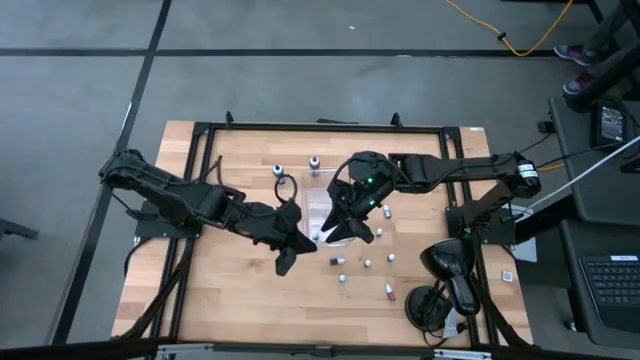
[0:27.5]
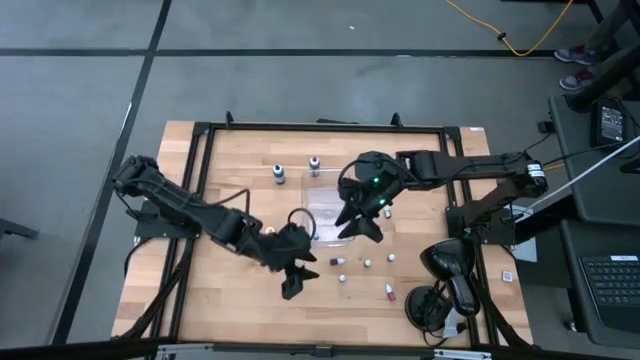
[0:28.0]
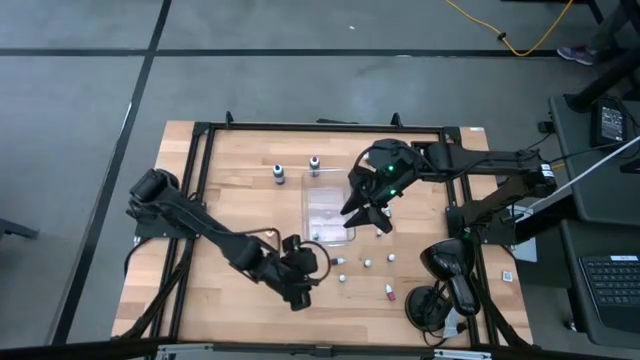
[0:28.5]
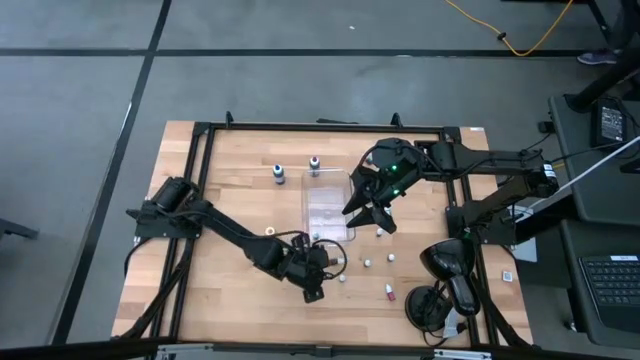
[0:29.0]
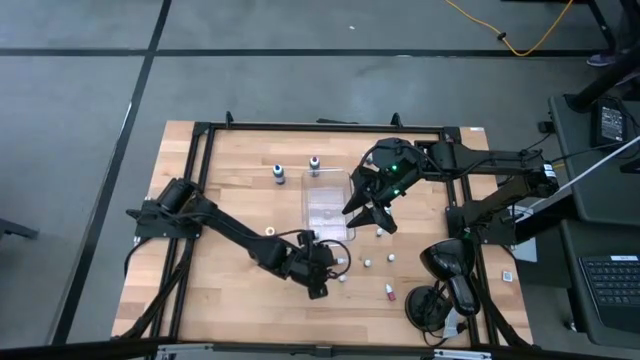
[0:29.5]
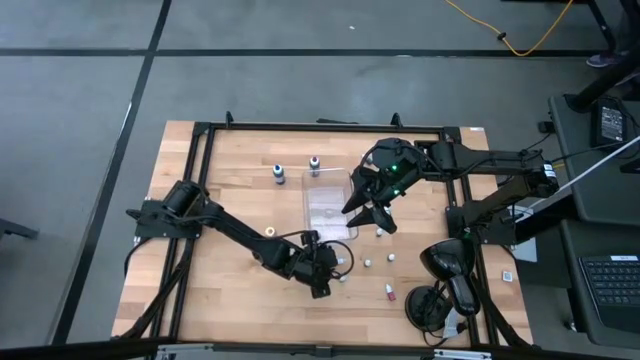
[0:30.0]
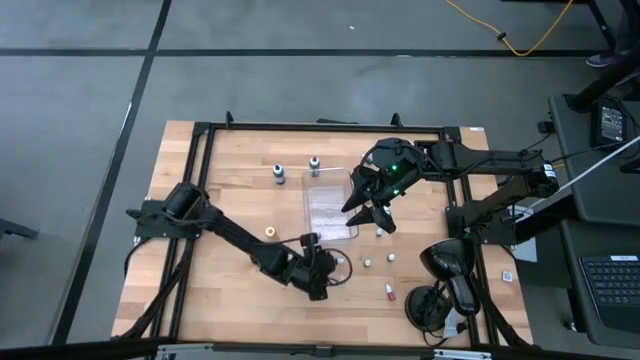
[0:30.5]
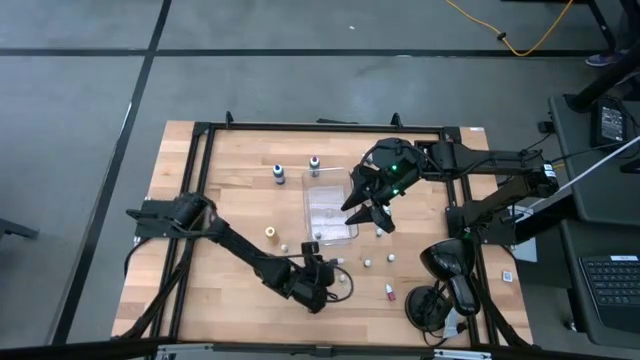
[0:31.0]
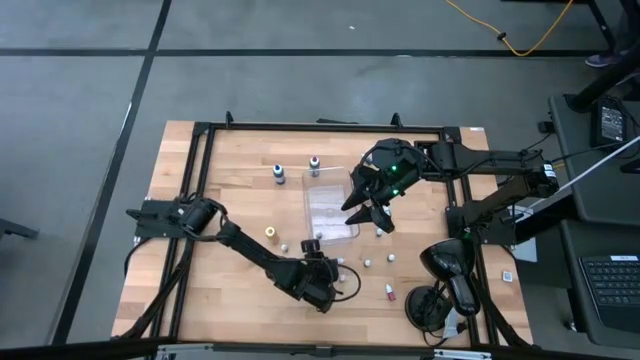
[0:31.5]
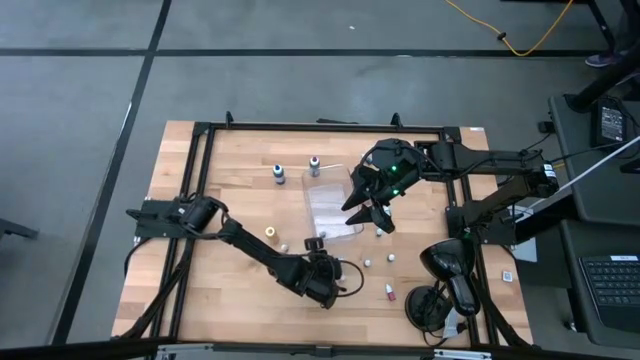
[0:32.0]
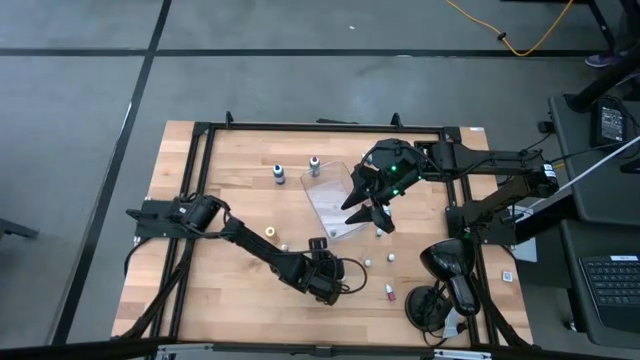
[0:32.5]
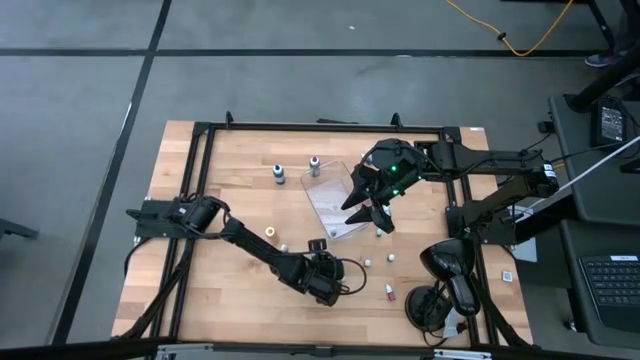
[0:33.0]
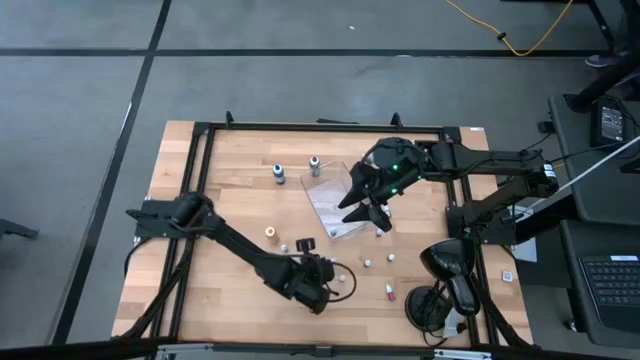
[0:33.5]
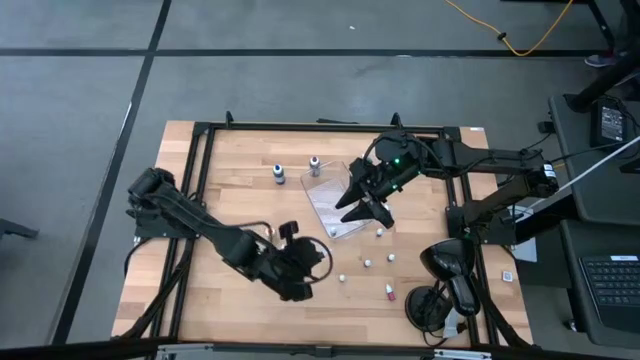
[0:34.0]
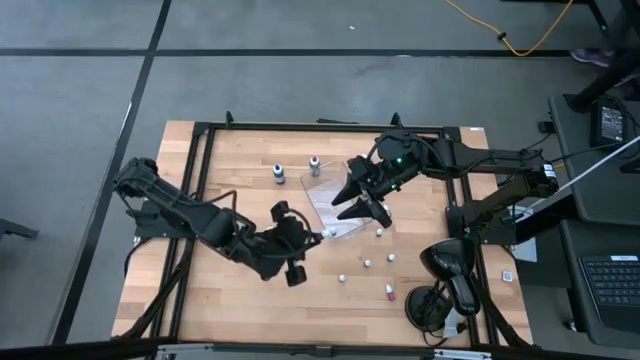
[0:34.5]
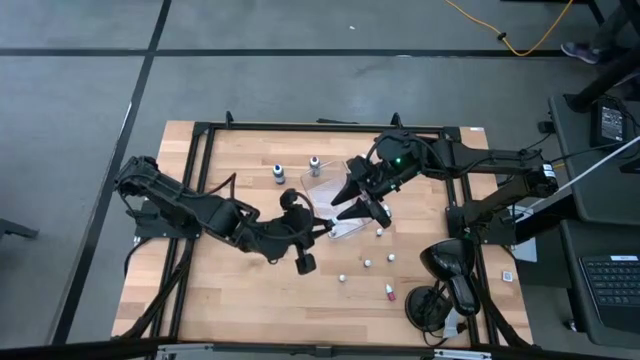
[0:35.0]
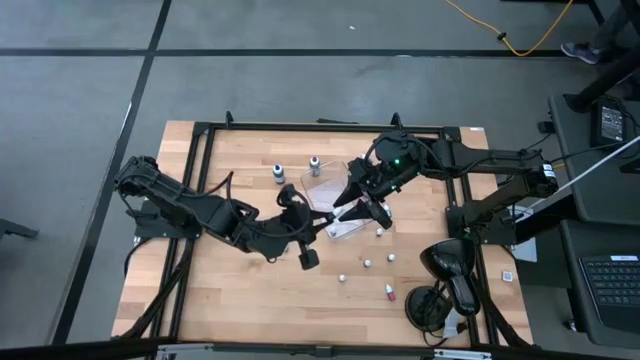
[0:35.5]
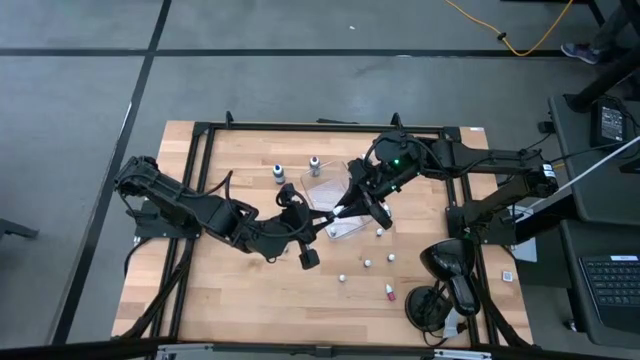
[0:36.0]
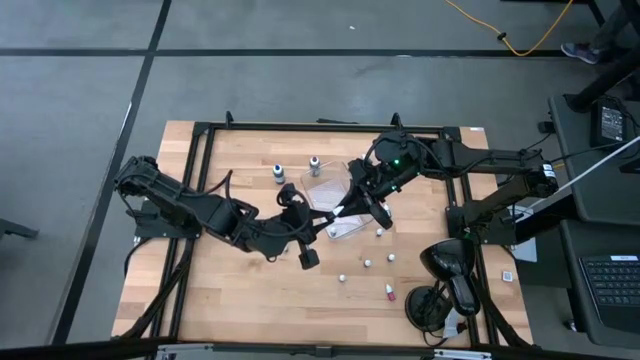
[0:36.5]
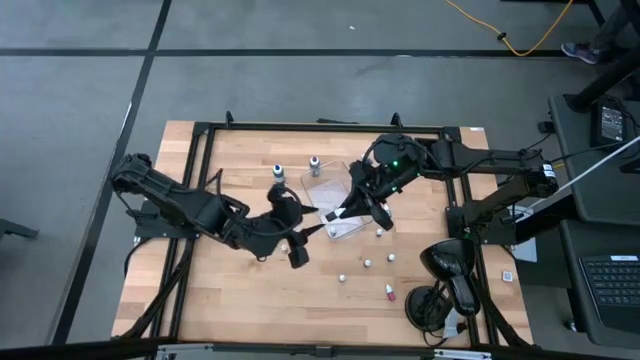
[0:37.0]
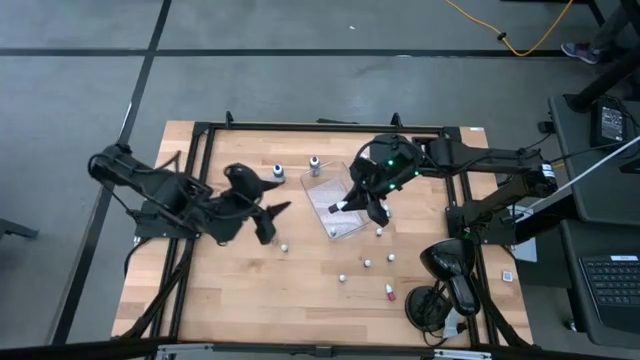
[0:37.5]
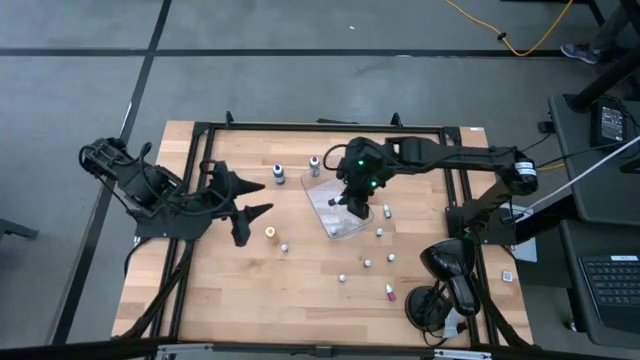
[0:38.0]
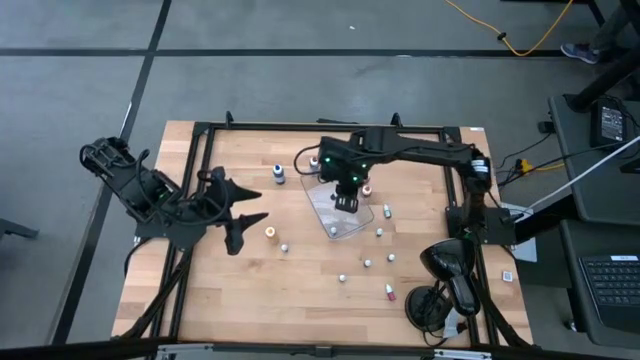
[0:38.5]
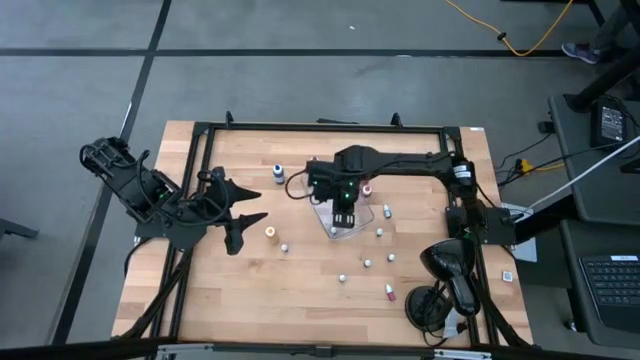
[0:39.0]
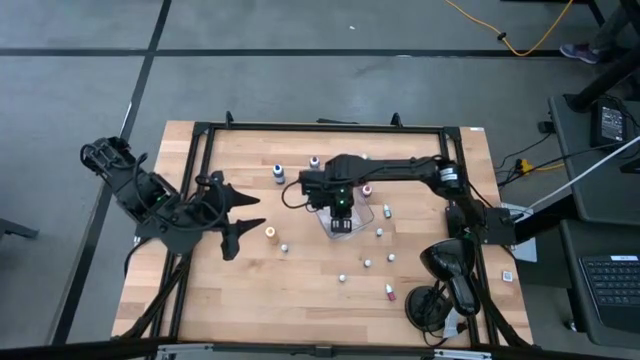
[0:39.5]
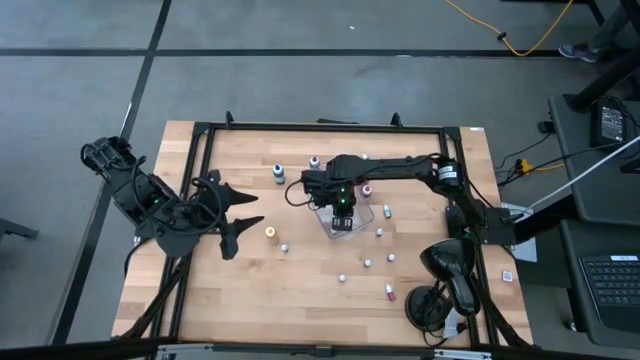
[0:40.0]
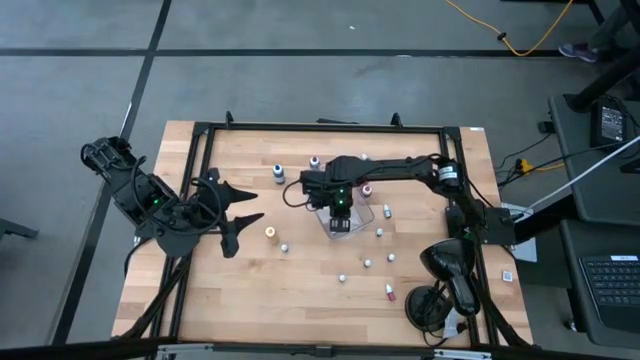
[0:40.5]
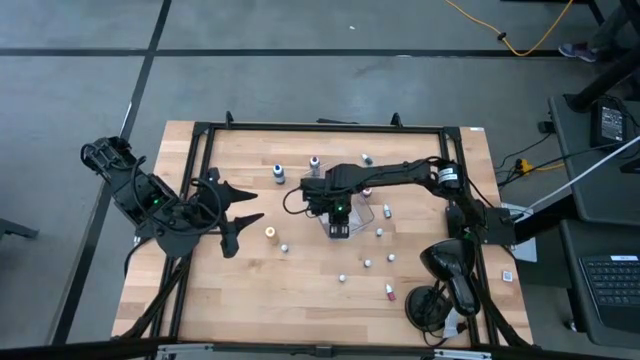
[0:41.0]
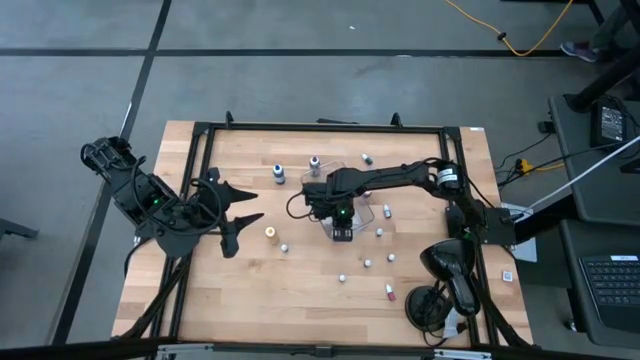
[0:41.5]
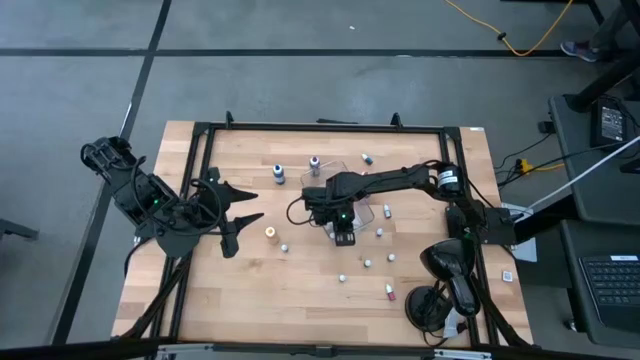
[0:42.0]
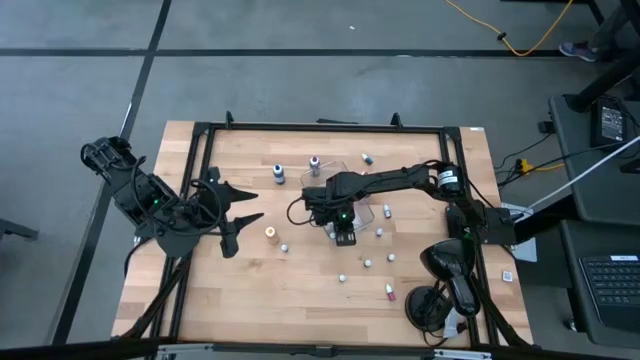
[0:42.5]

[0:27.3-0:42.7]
Task: Pick & Place food coloring
Put the small pink food coloring bottle into the bottom of the bin

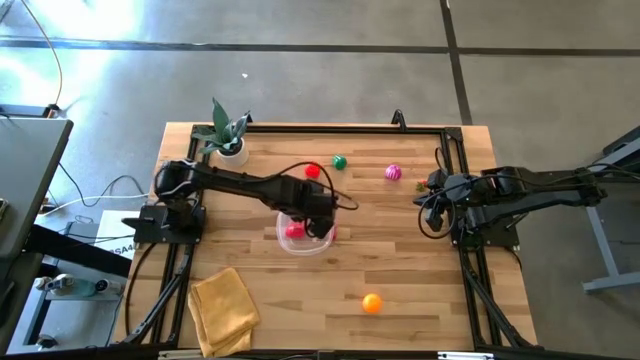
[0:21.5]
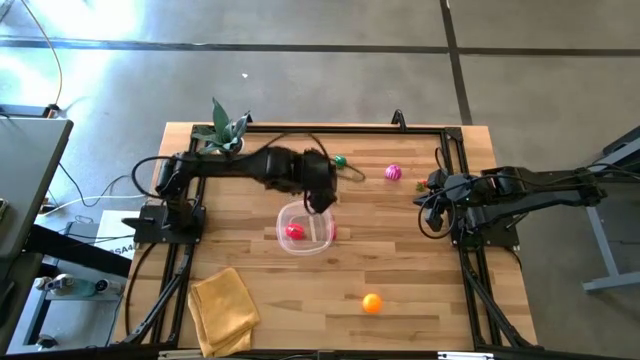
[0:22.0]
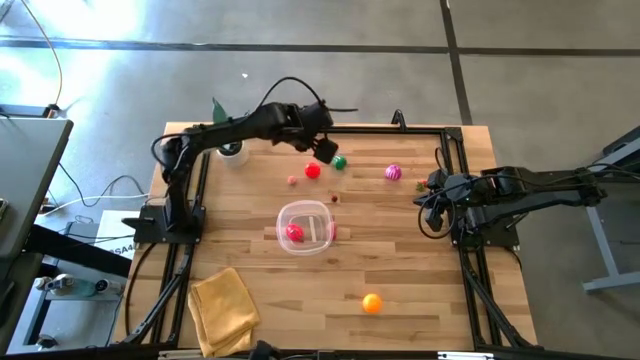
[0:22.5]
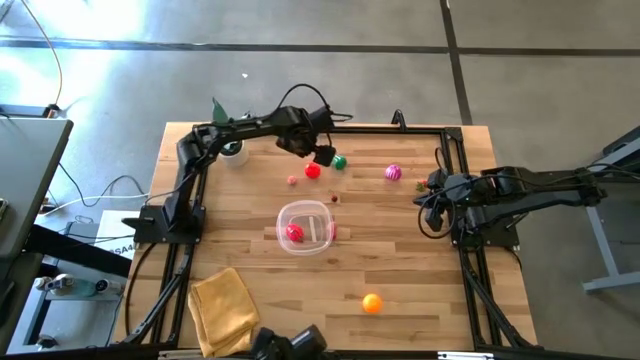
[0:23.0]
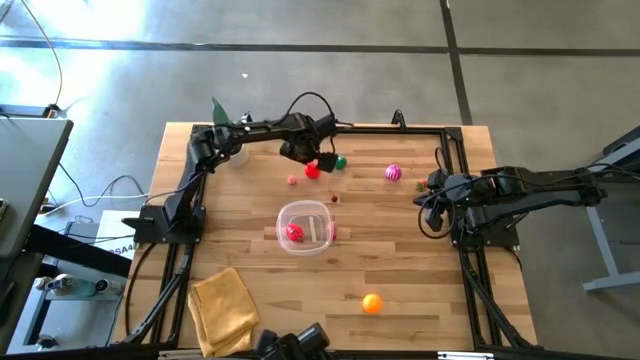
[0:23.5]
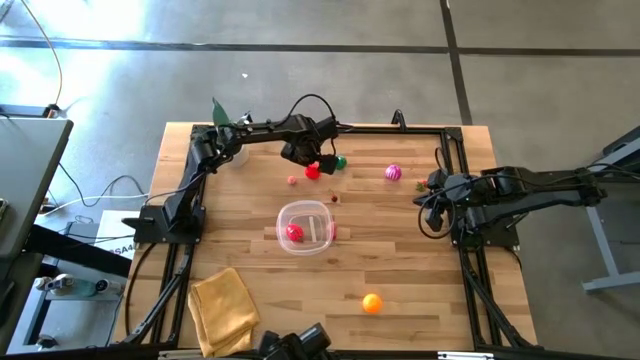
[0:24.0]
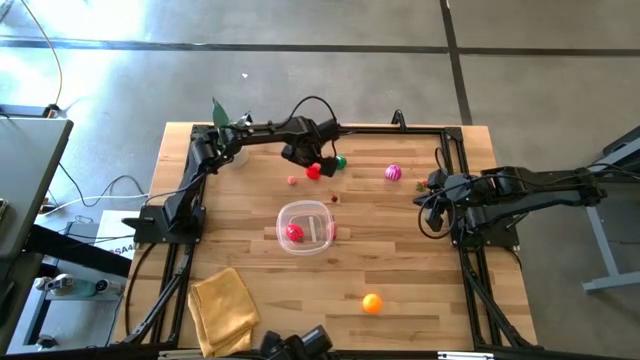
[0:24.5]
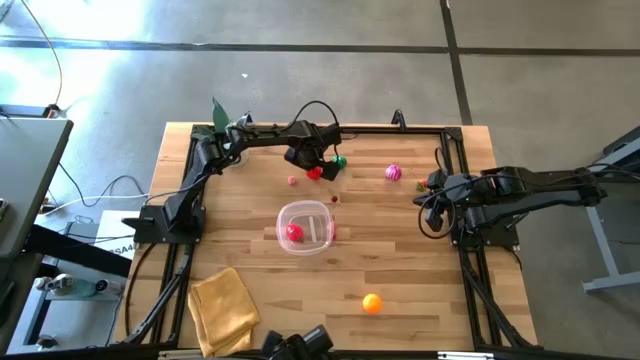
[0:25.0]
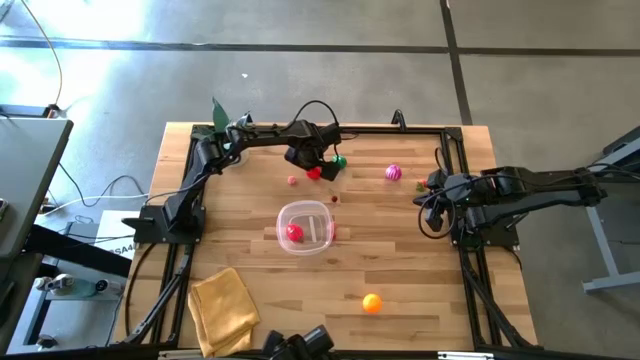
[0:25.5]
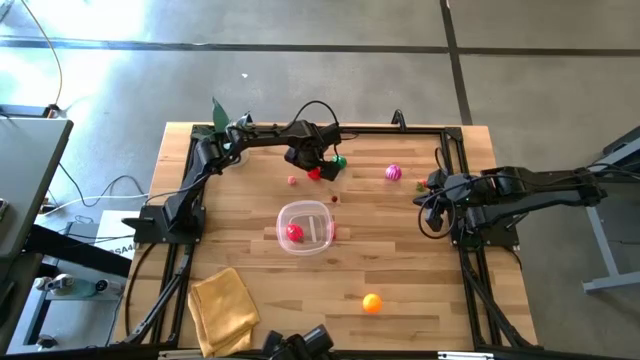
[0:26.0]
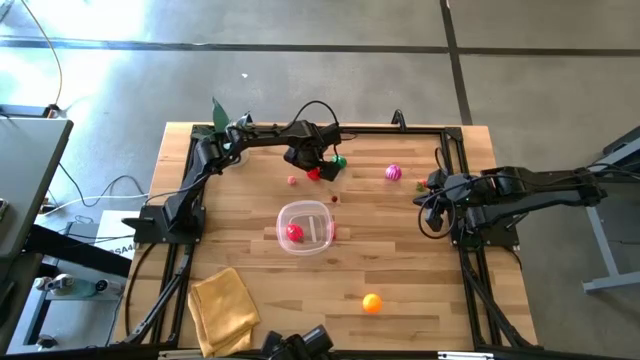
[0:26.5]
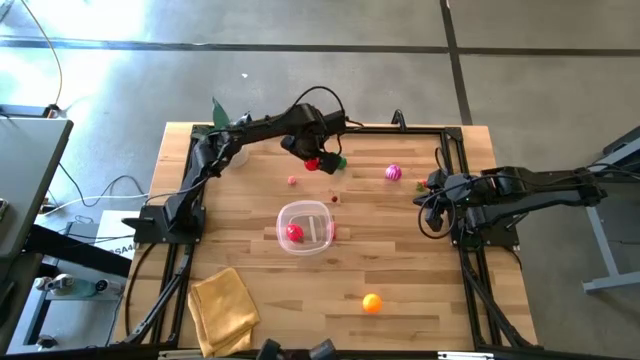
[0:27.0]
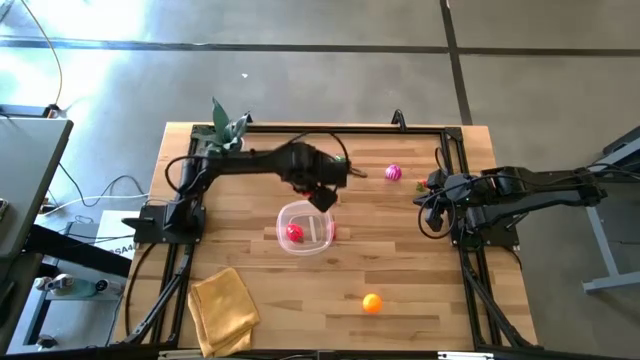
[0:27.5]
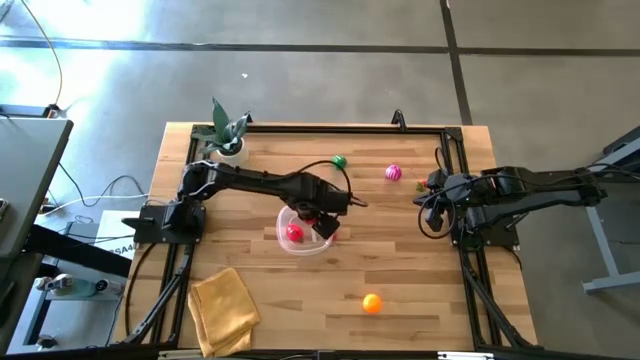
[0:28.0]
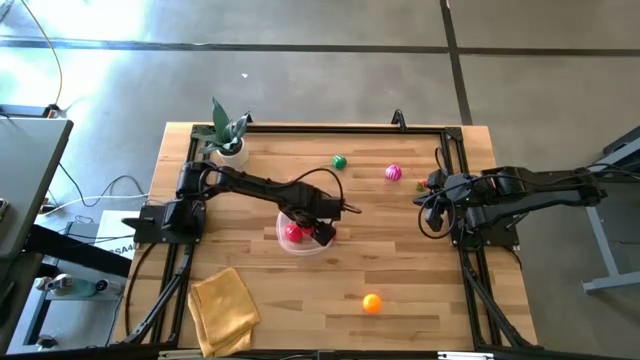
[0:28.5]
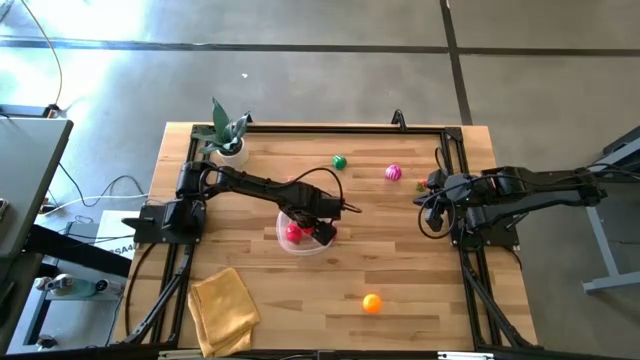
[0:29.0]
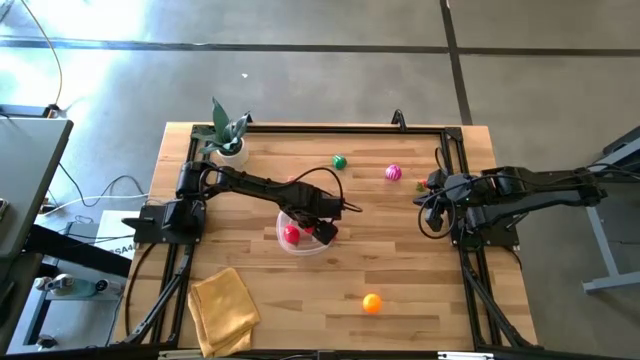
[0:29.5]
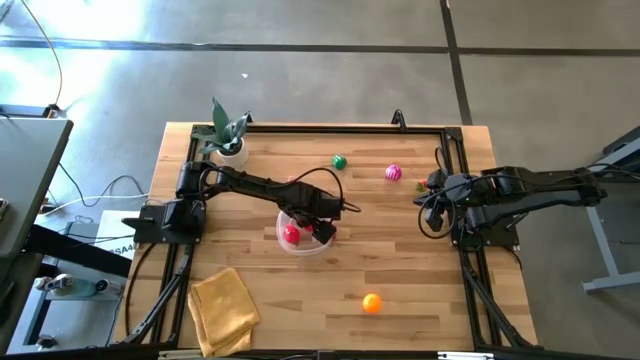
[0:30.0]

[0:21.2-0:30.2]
Task: Pick and placing Produce into tupperware
Put the orange tomato into the transparent container
